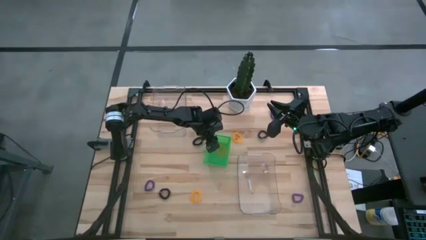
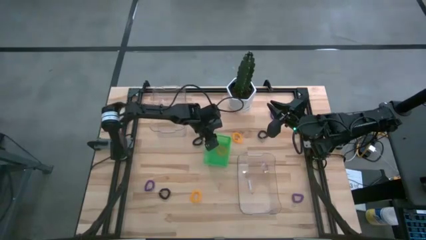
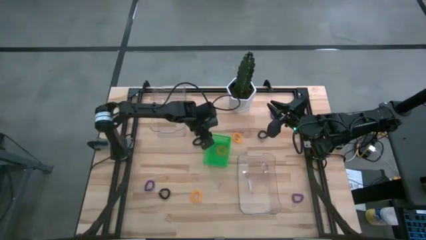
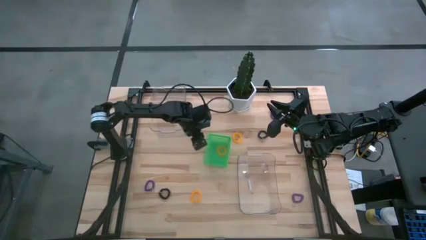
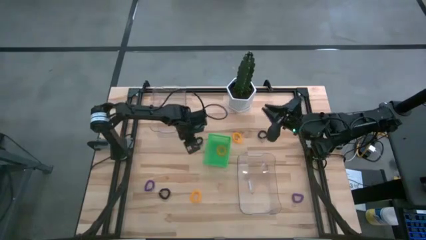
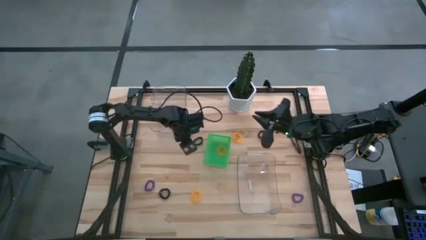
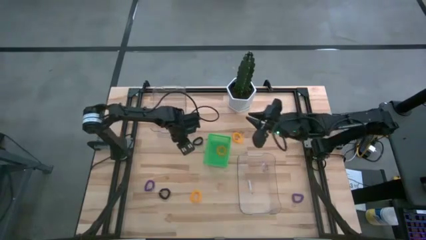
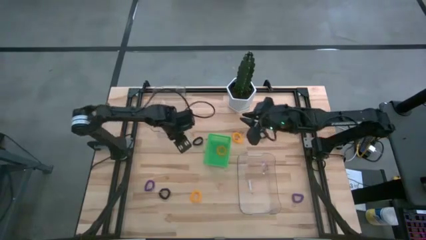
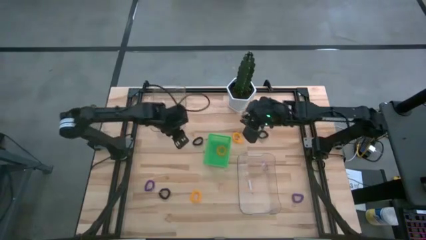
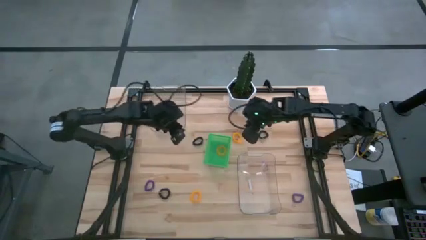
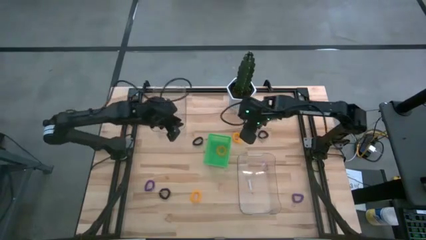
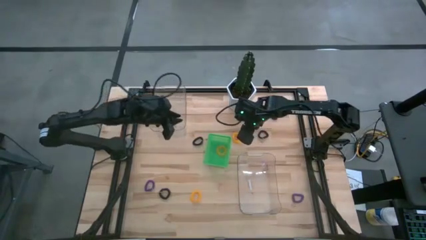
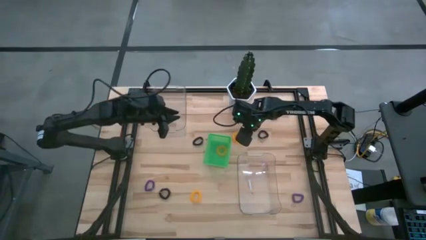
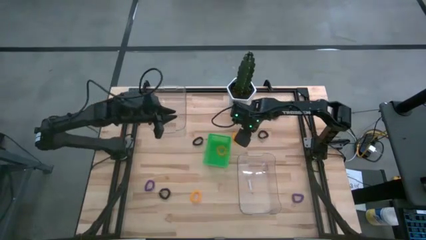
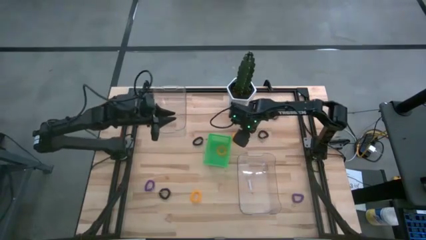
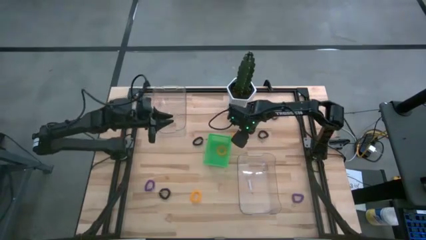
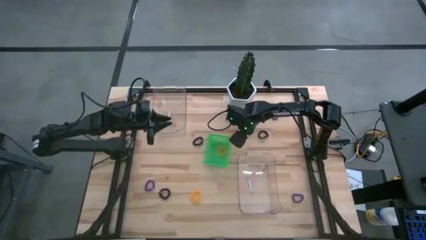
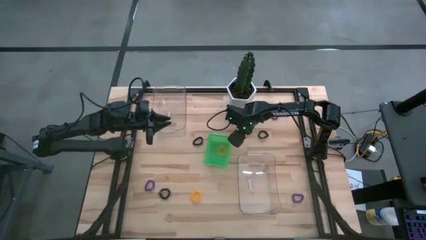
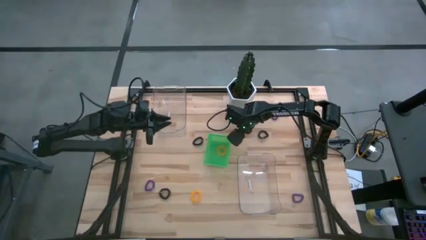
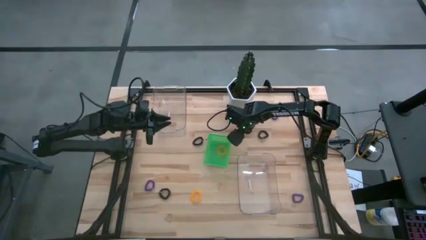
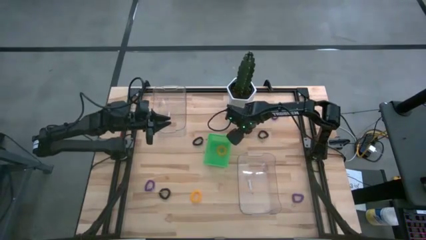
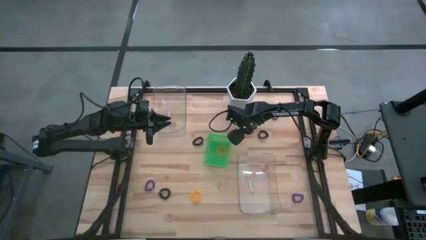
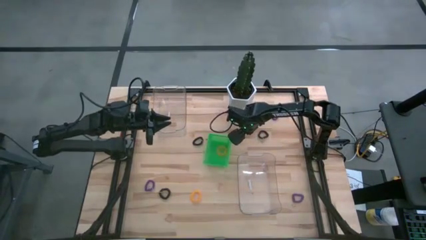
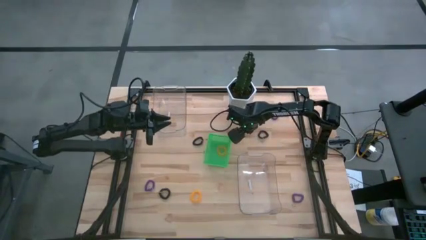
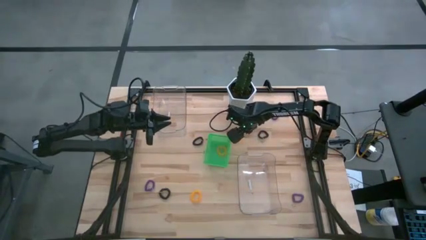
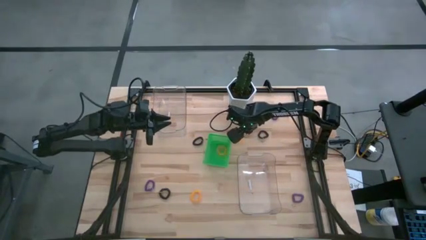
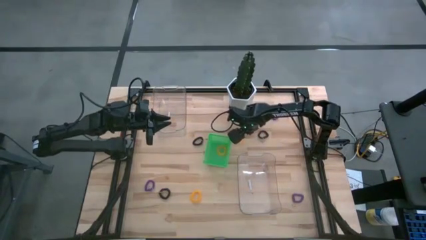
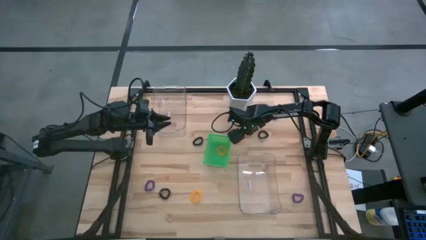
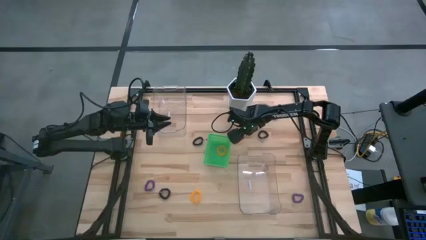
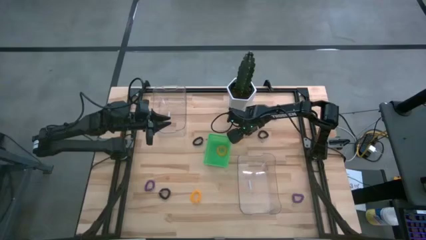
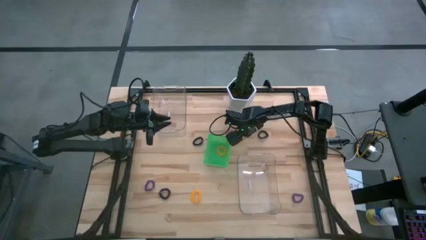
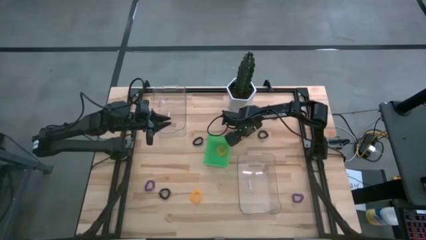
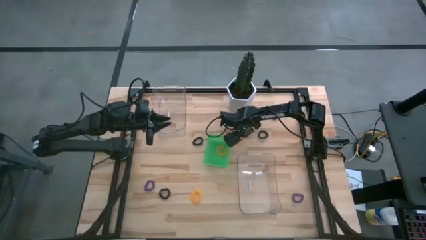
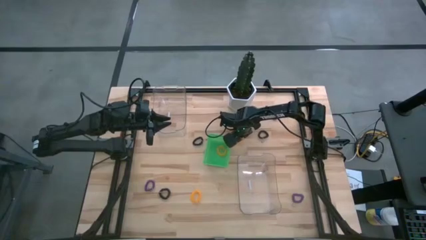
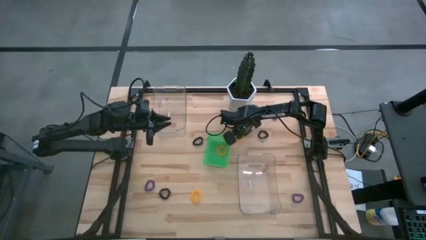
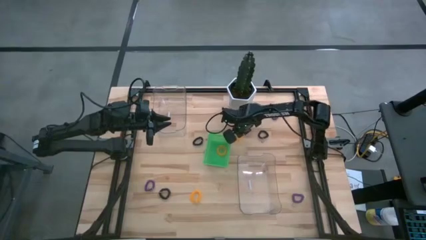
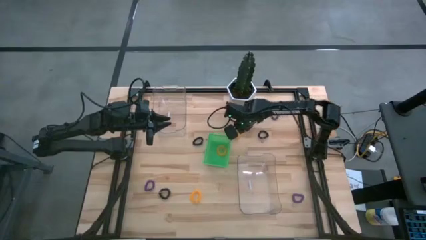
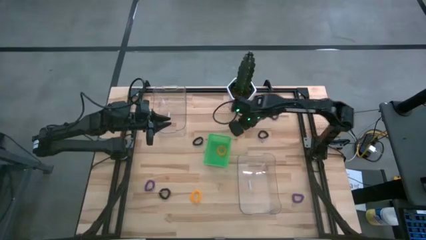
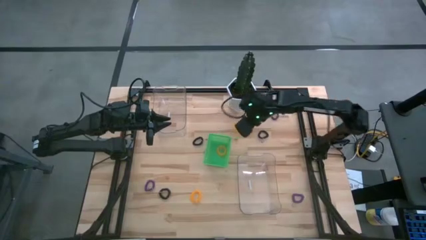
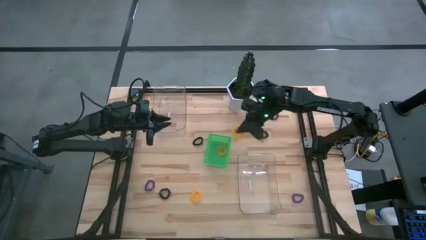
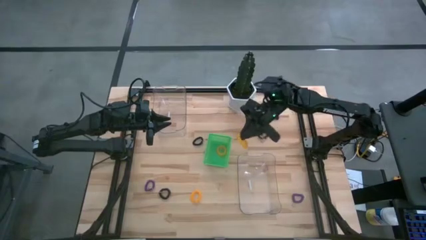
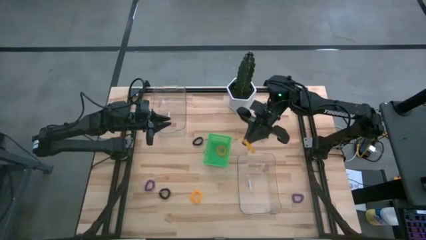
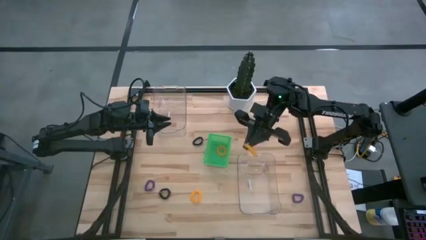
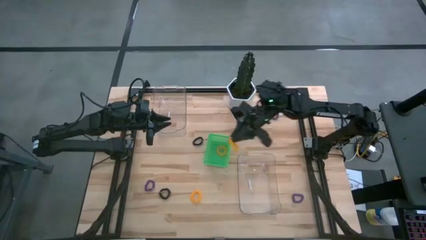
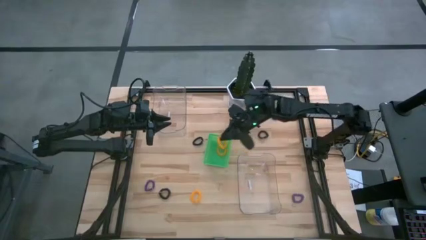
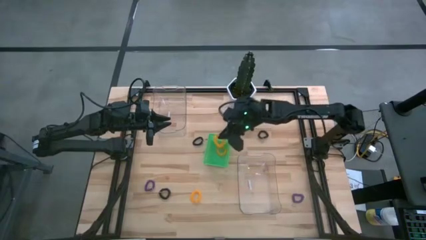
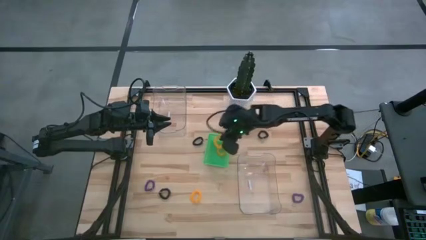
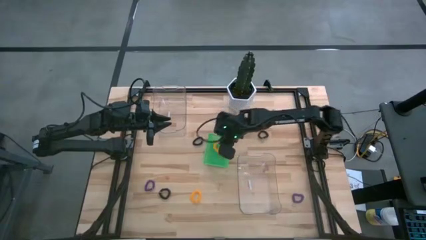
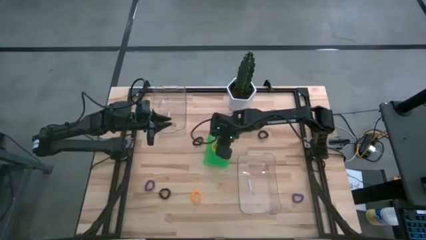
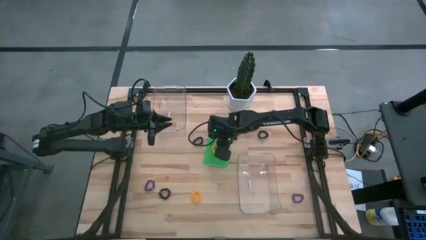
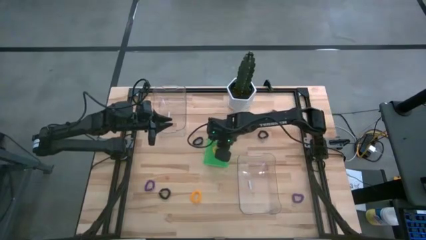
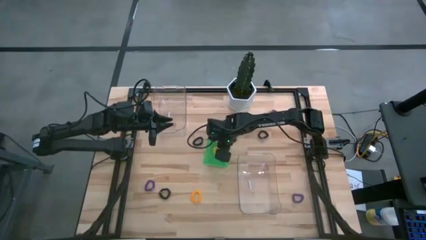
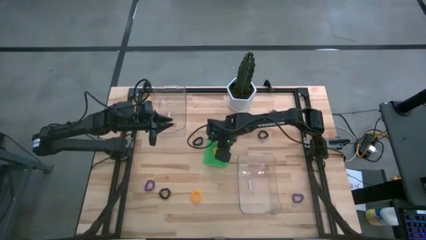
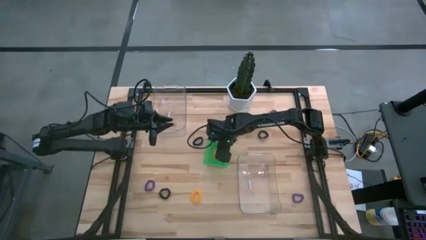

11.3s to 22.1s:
Task: Sort spring keychains
Put the top right yellow spring keychain into the green basket
